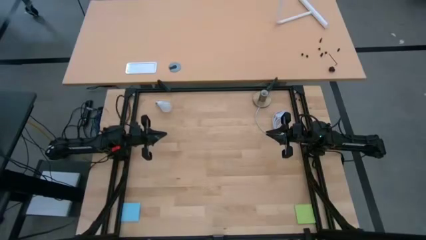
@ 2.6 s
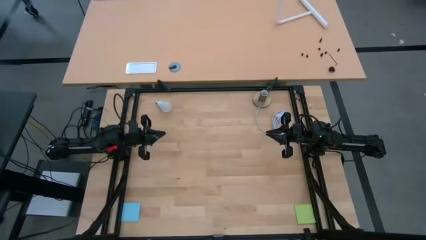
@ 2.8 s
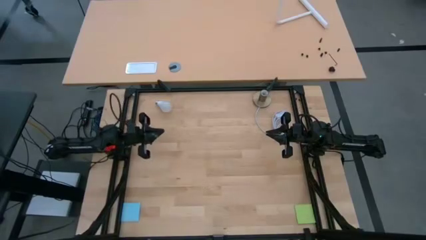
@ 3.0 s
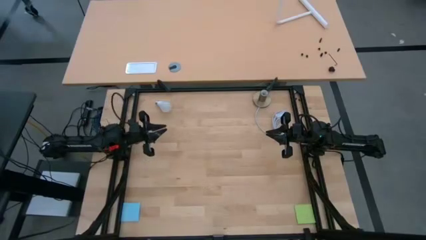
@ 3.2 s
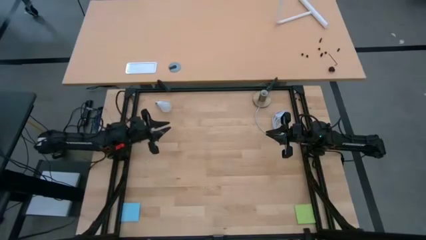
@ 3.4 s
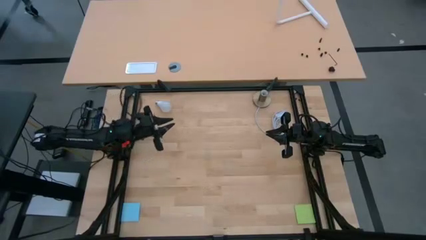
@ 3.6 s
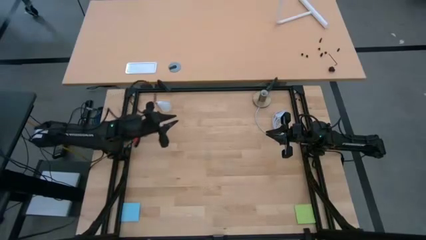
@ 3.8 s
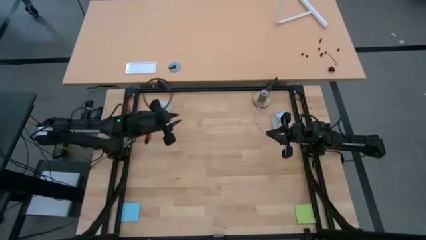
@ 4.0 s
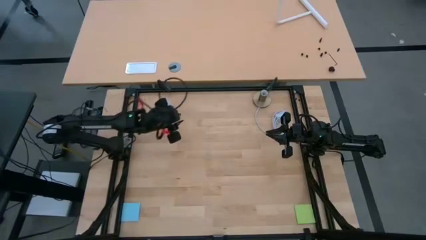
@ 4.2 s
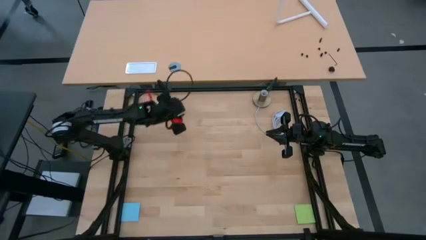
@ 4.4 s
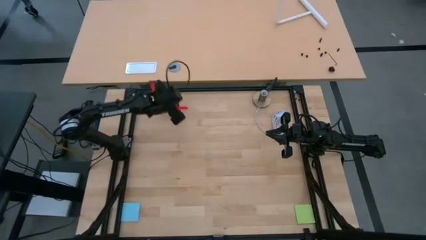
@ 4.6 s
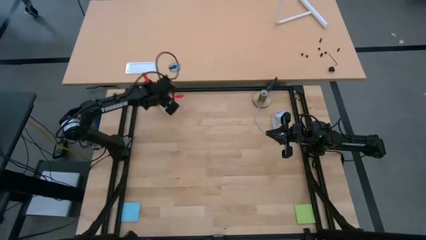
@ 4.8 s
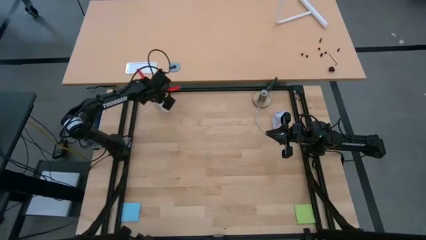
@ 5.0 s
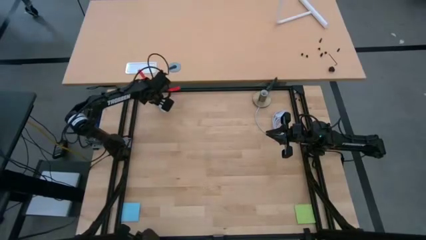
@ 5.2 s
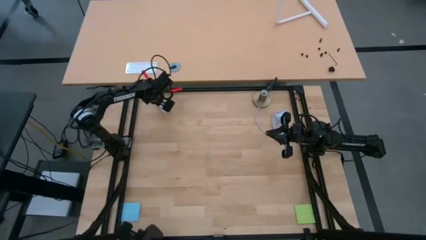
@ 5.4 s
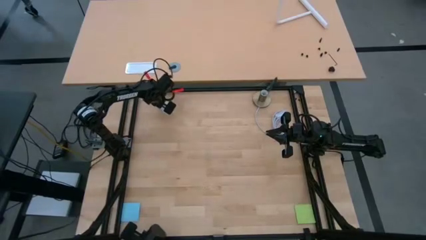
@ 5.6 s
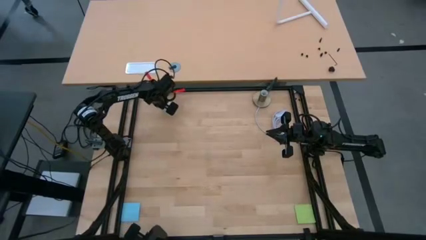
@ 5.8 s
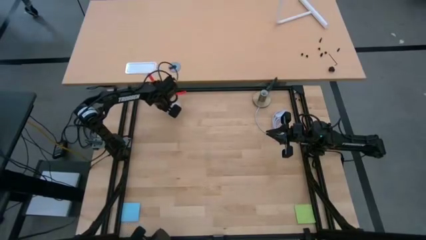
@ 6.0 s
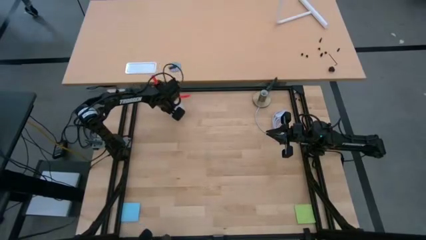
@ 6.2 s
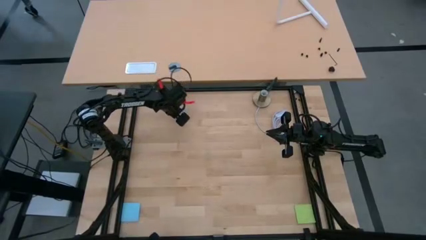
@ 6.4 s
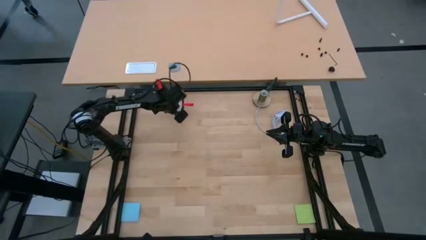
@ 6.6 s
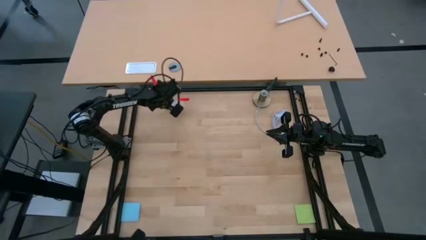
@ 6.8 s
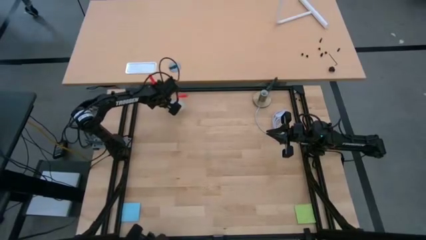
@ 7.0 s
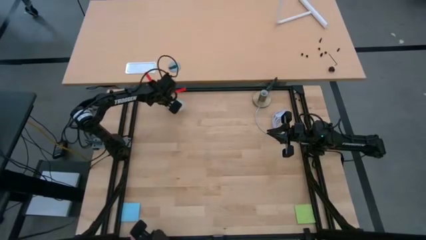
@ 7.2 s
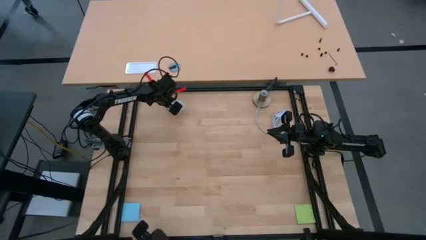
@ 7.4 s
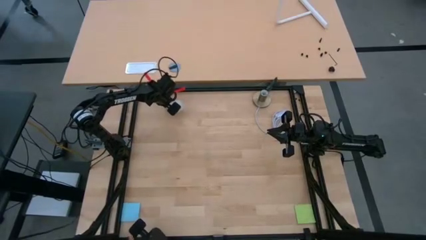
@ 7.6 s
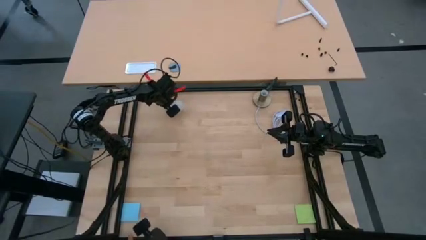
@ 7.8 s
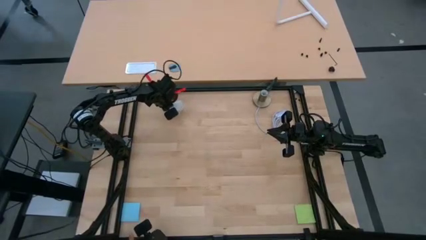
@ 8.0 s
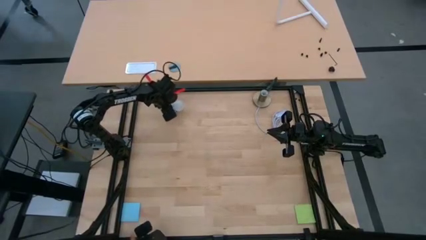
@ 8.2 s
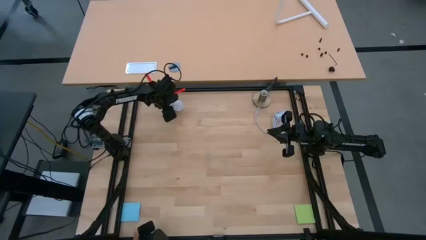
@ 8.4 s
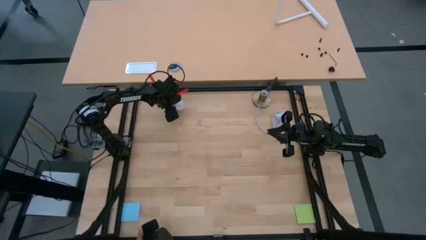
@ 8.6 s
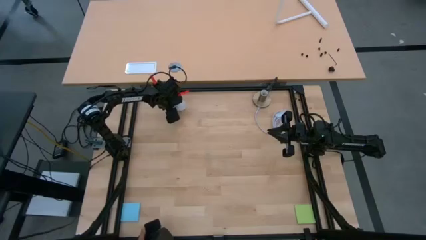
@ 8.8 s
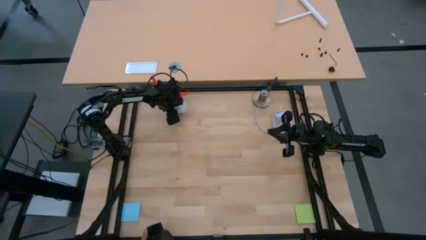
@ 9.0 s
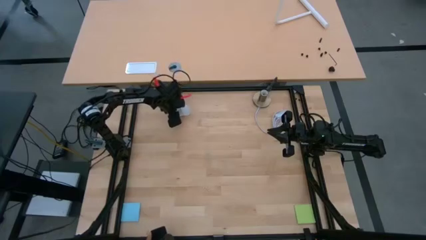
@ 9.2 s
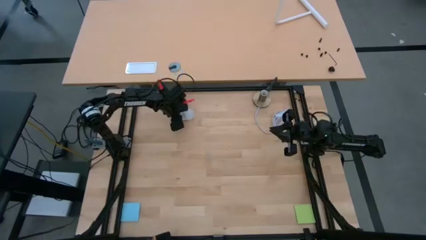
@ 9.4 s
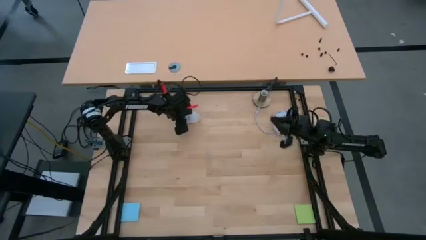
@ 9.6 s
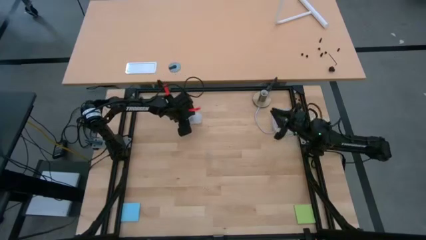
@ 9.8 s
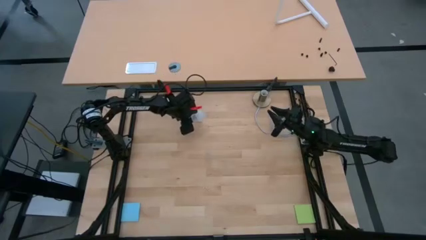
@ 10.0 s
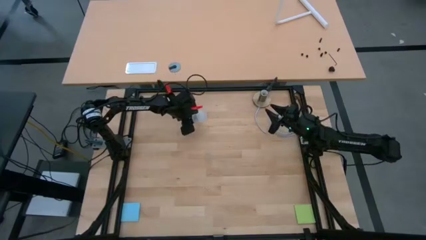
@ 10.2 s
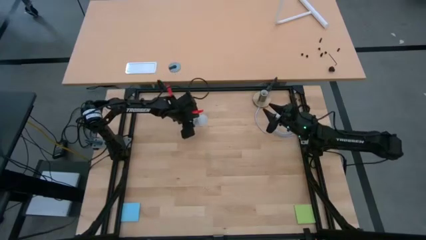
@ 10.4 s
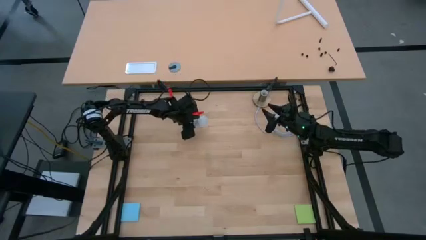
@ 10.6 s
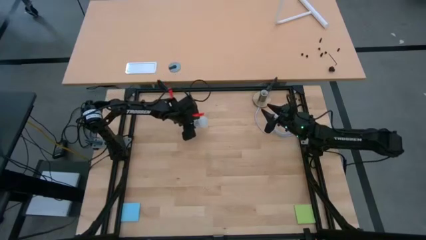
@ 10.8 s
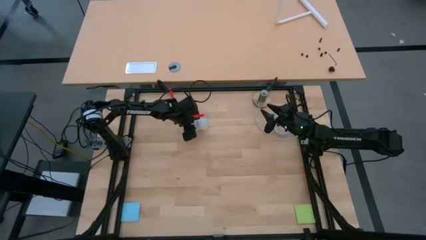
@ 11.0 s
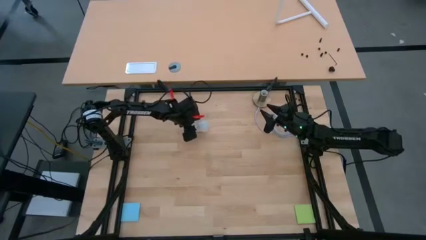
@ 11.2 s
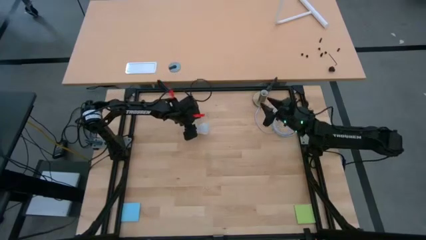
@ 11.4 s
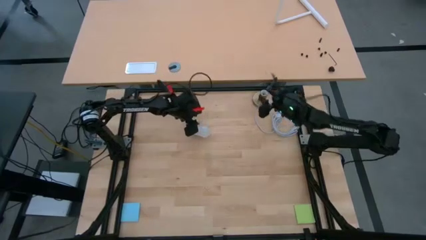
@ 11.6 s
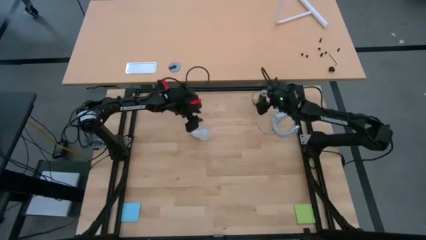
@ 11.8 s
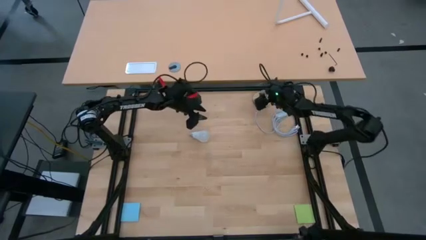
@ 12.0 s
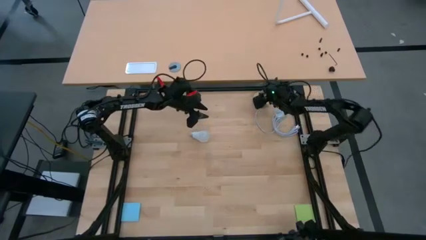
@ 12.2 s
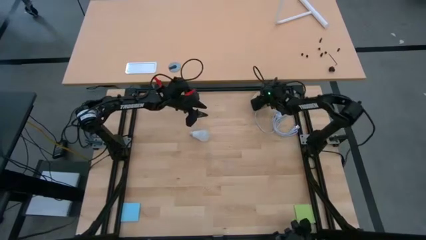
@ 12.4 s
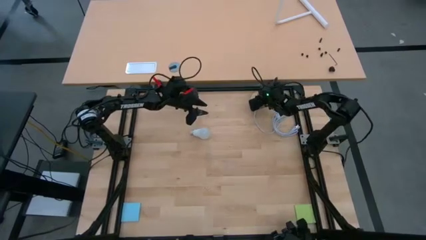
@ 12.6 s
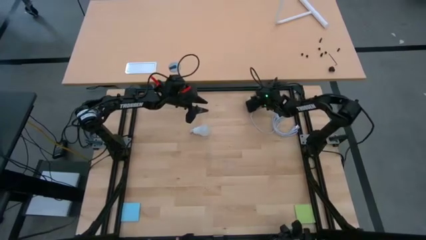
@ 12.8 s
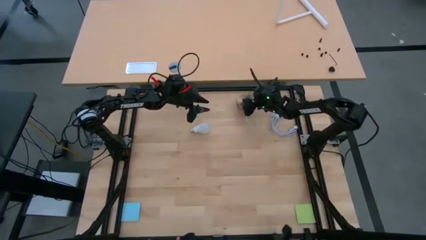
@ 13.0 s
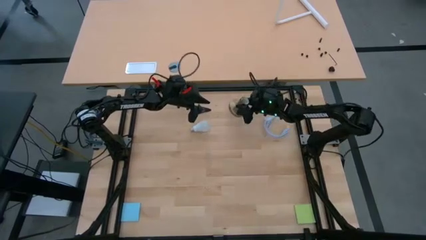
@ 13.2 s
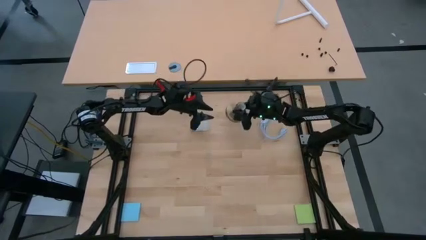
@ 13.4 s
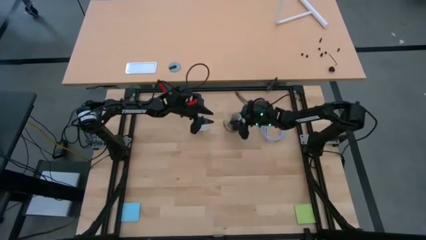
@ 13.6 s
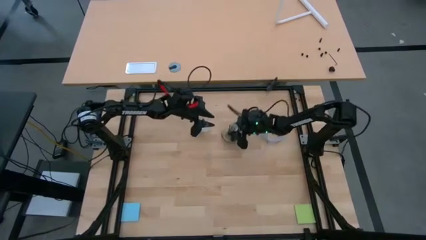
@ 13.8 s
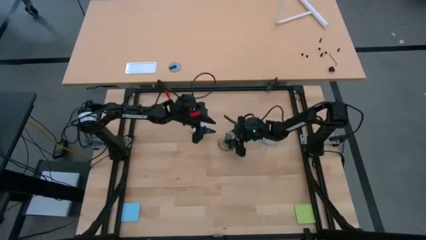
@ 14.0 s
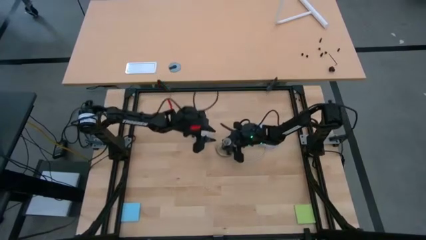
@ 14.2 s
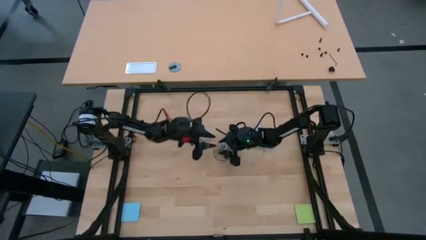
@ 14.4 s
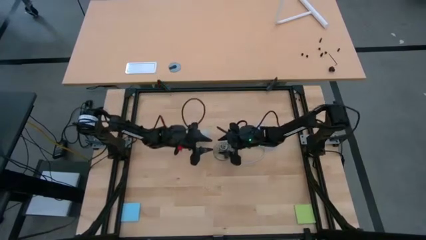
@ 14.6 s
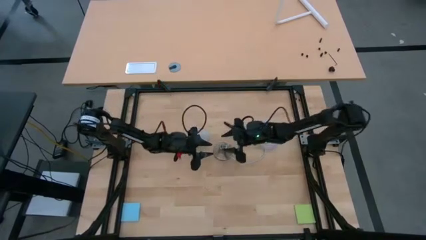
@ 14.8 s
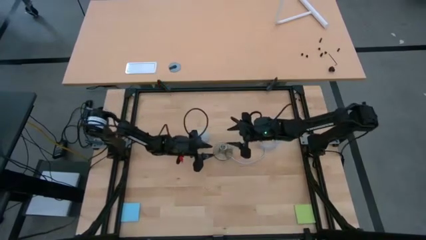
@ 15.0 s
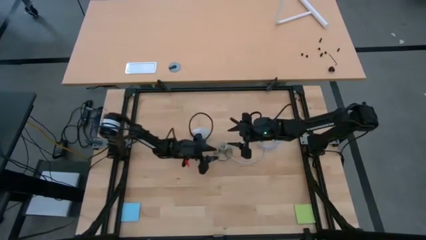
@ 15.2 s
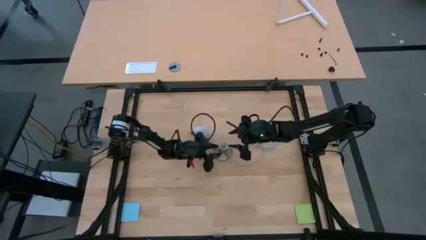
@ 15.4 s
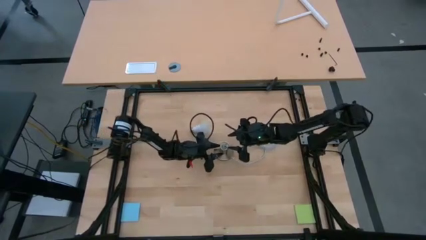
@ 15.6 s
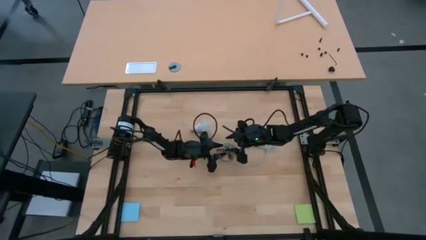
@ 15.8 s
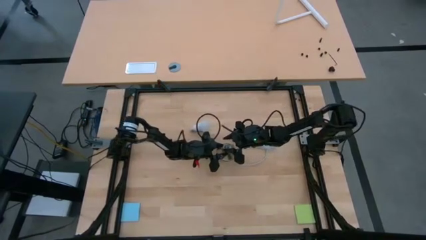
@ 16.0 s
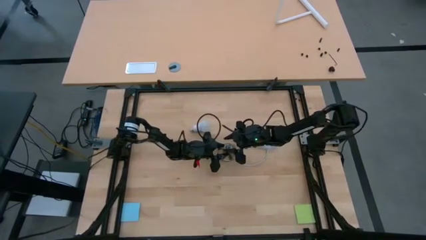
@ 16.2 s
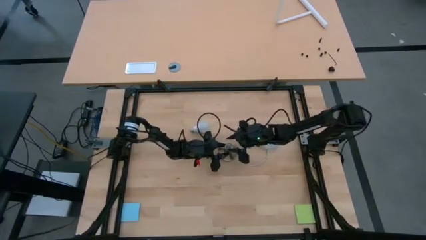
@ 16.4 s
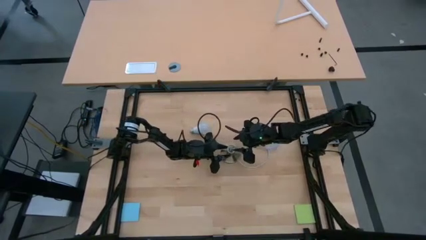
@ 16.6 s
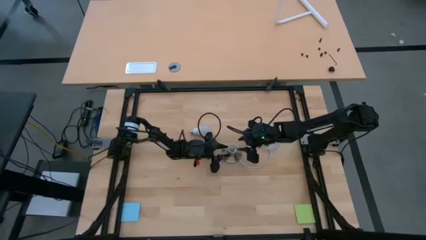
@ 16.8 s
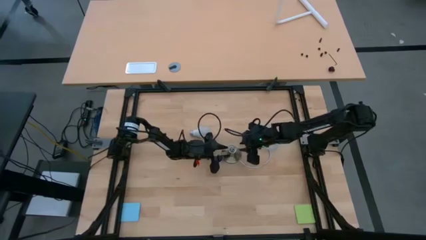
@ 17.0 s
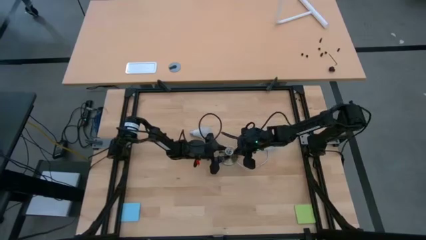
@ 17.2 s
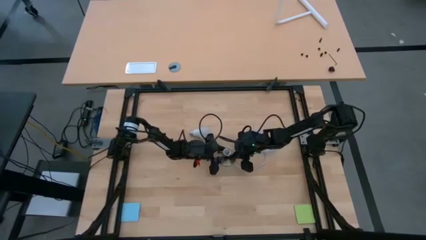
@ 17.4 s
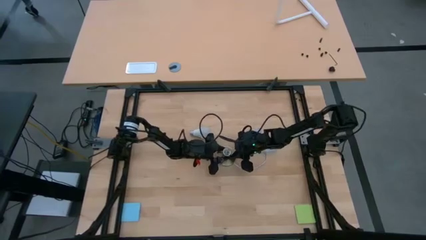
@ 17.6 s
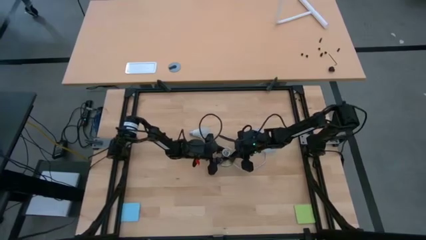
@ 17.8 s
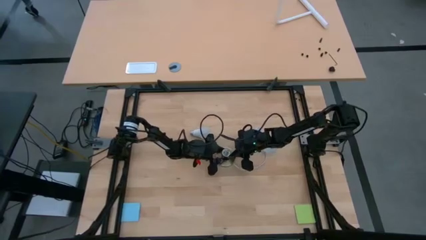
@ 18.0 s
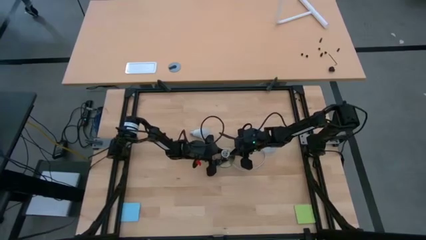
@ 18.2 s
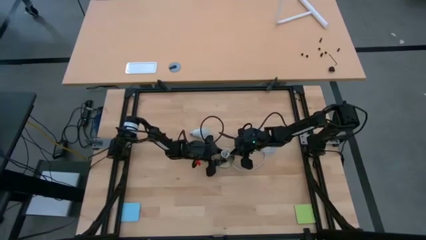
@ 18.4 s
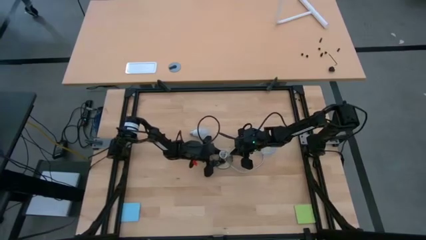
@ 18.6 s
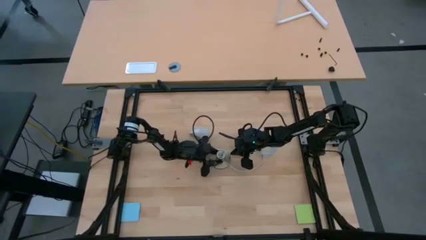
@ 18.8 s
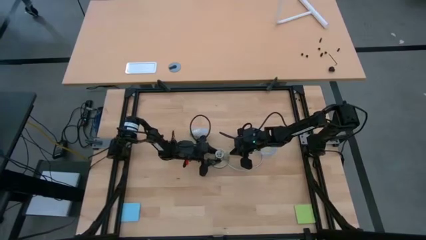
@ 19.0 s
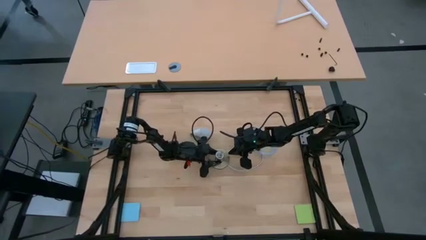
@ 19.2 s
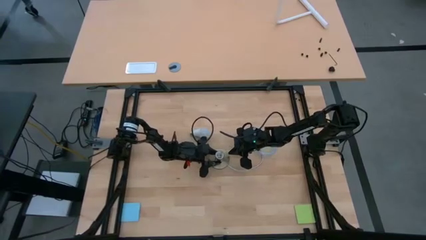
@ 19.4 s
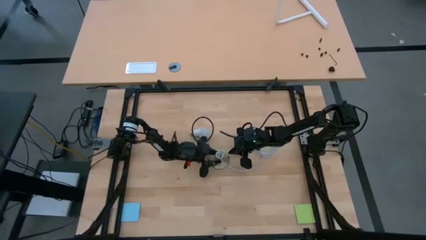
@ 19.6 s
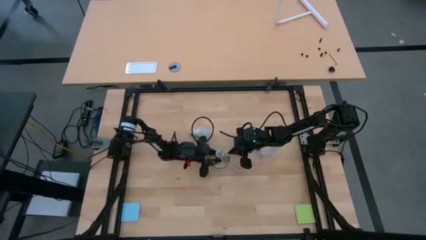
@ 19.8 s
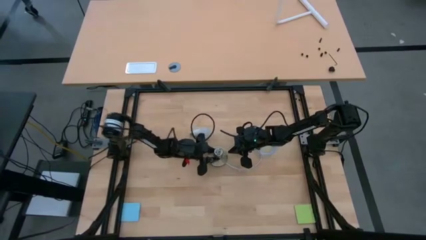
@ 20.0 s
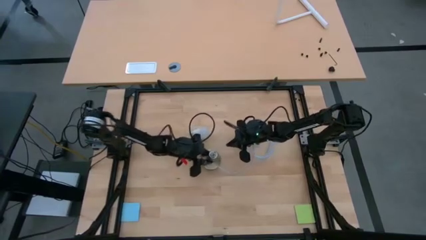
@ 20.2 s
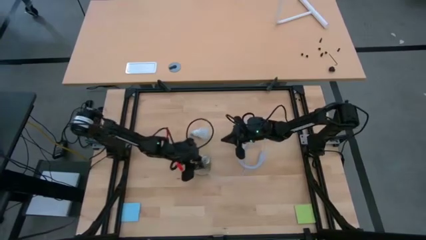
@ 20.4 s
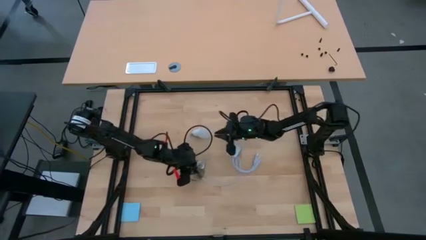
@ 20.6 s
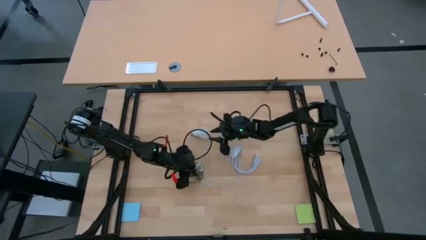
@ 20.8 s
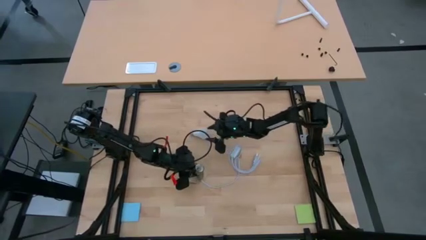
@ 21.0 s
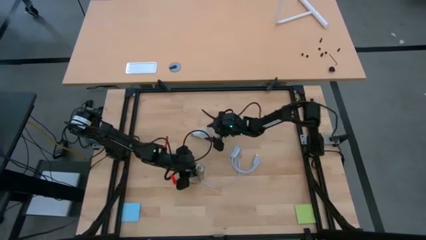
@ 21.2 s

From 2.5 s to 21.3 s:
Task: Screw lightbulb
Insert the white lightbulb into the golden lamp
